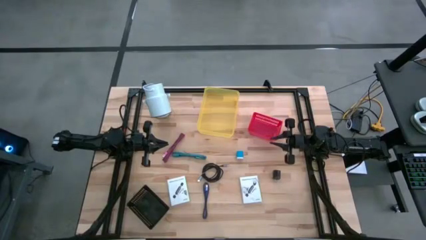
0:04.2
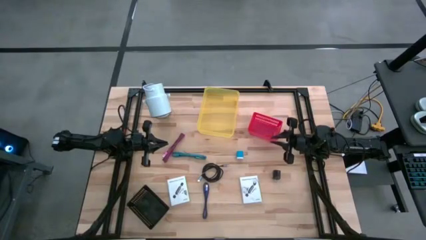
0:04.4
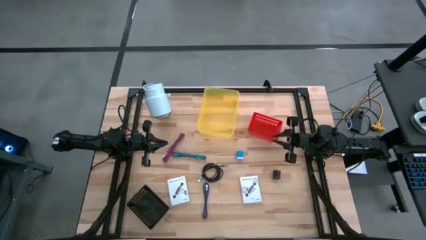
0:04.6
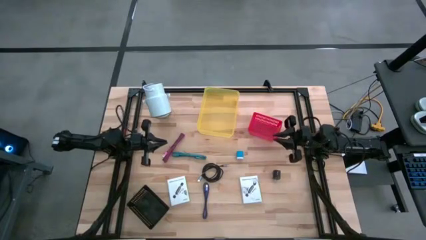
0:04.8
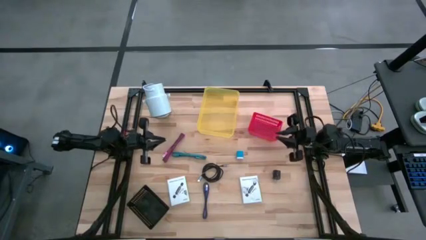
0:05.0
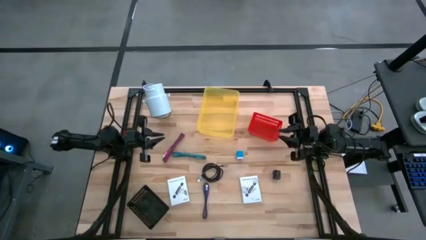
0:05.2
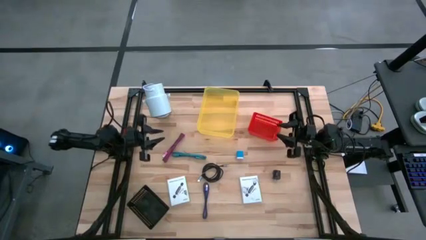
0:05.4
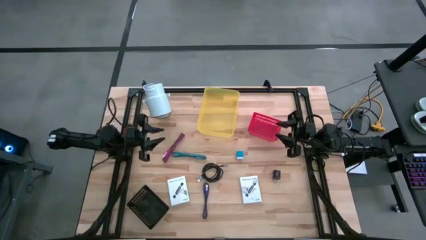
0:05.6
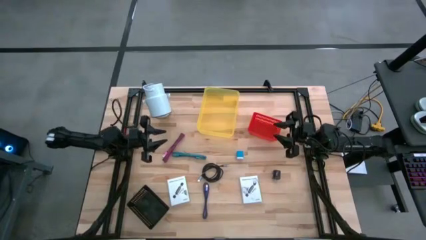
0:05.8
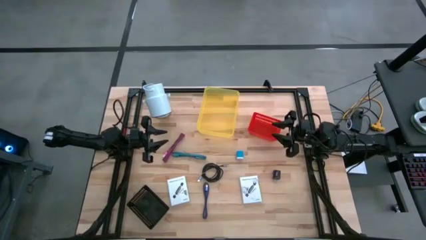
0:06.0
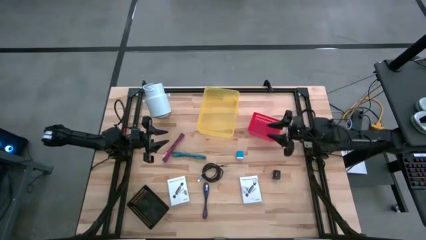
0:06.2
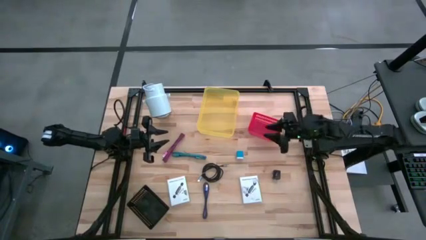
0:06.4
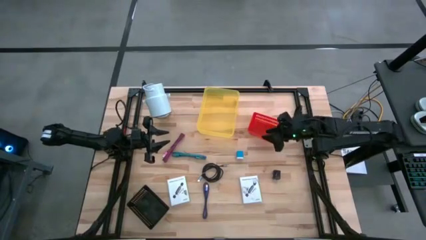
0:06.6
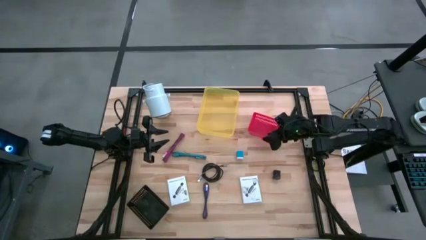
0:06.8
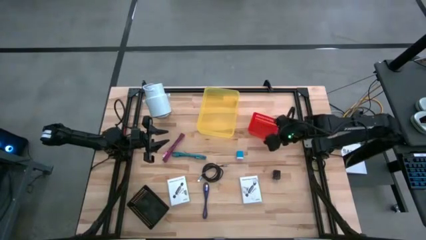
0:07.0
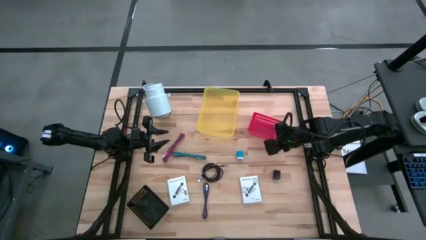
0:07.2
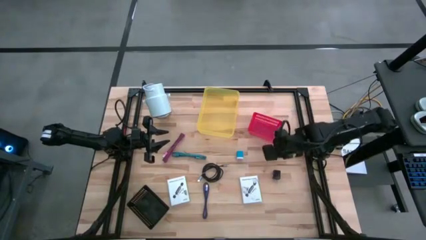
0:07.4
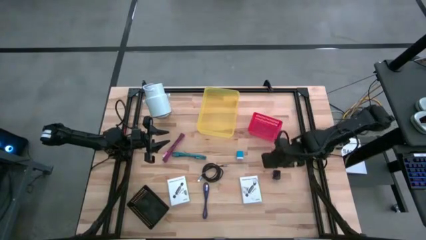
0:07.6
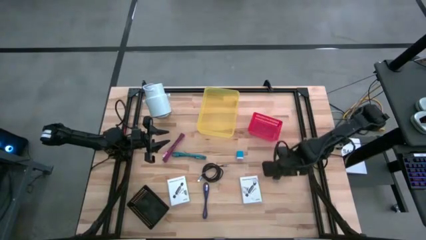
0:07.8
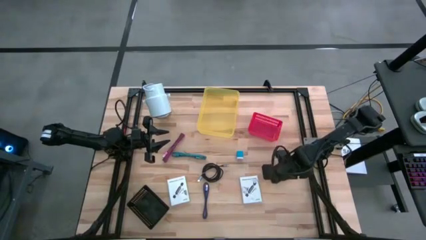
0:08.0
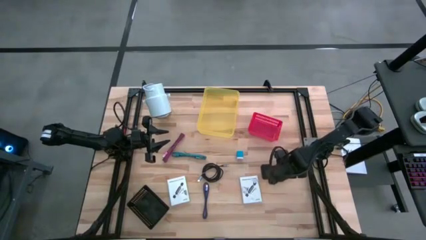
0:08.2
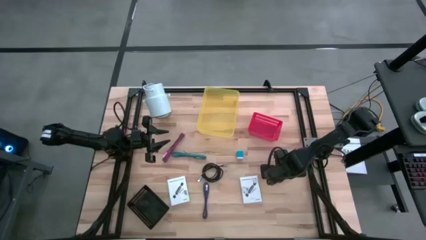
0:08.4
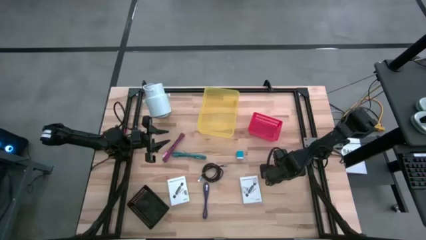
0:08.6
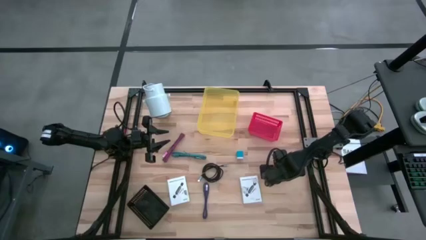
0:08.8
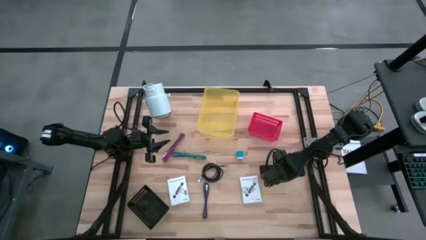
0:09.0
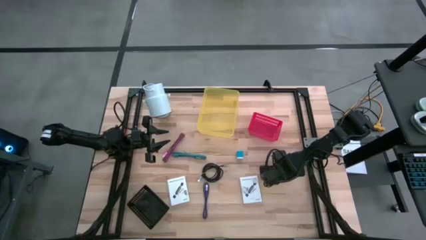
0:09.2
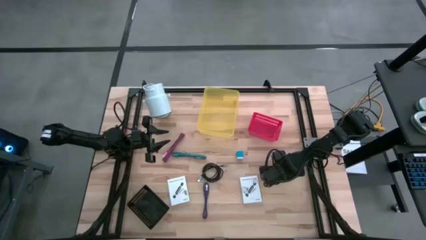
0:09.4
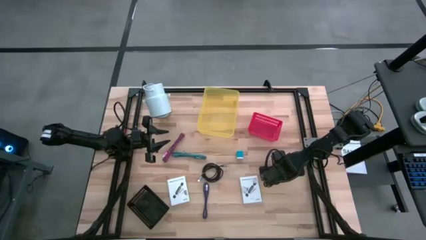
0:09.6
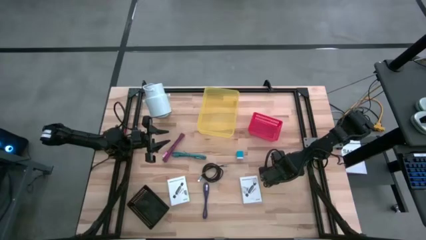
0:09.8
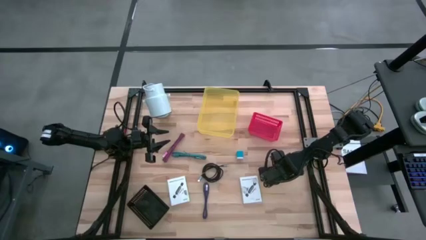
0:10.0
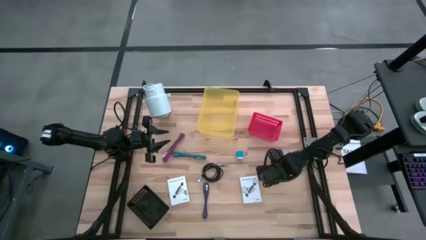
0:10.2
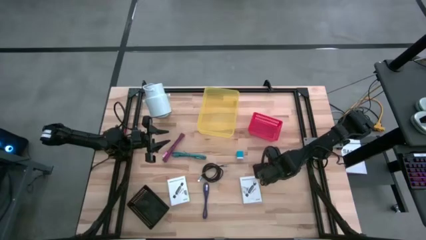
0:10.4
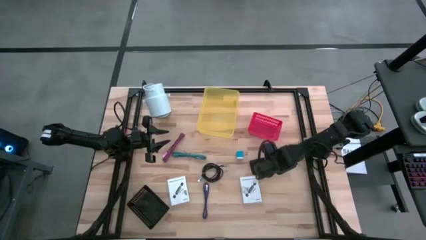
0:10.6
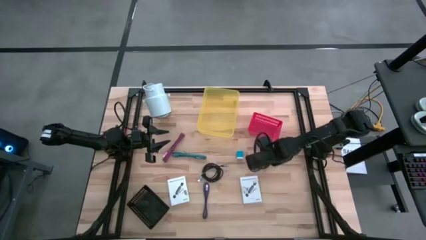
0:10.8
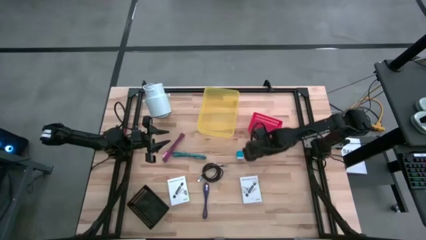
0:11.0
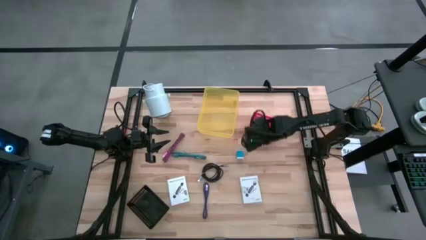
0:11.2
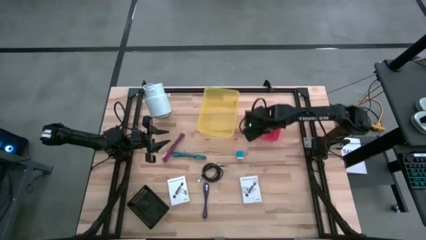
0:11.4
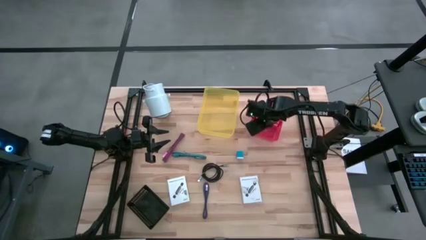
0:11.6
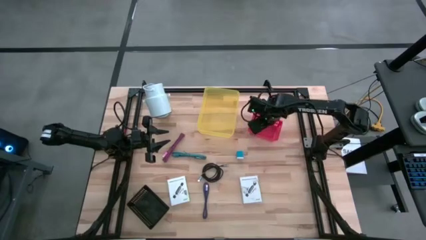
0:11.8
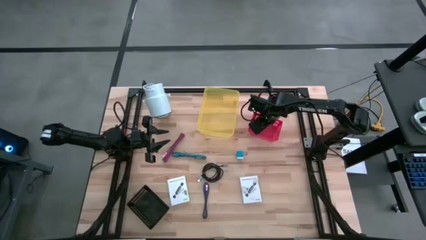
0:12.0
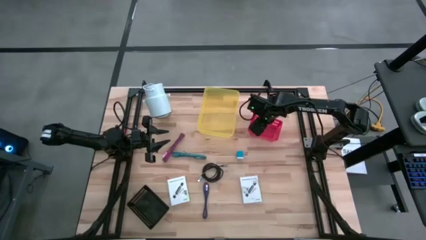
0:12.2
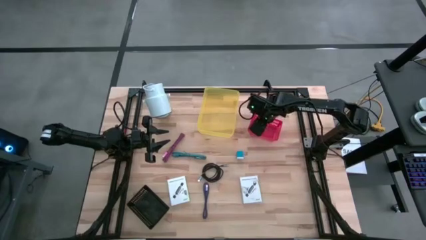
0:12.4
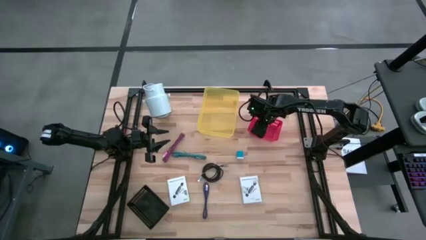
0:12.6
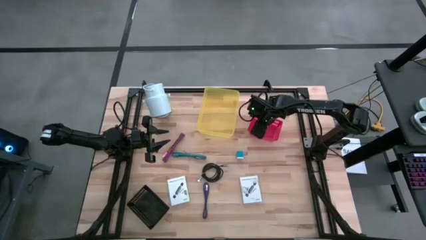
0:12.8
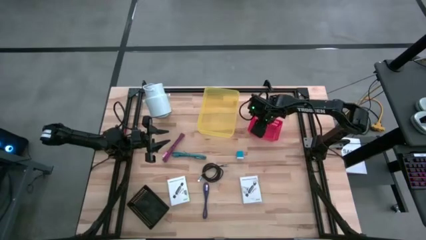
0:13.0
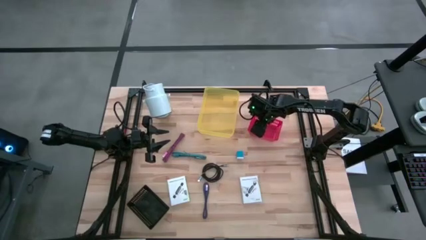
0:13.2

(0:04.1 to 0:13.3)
Task: Pick and place items into bin
Put the black charger adapter into the red bin

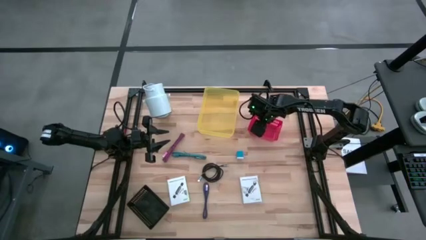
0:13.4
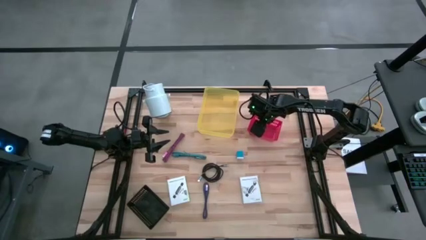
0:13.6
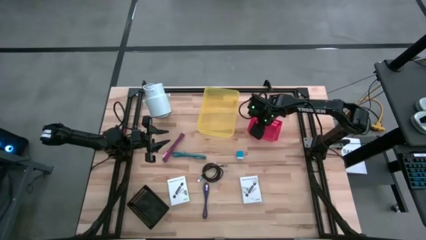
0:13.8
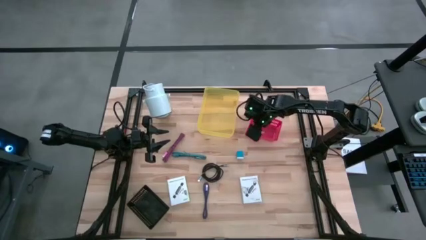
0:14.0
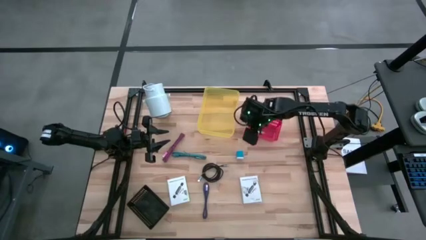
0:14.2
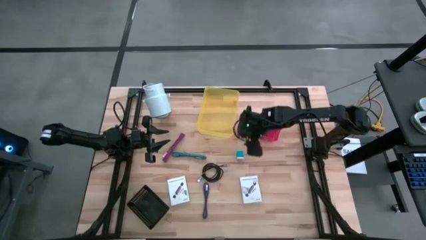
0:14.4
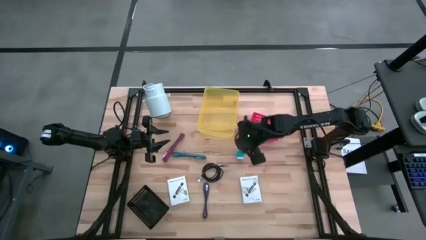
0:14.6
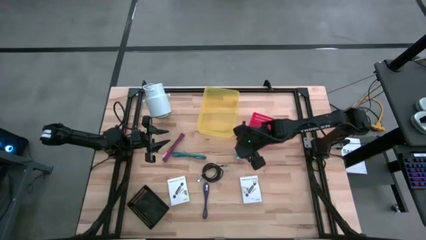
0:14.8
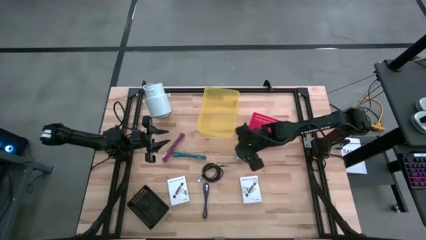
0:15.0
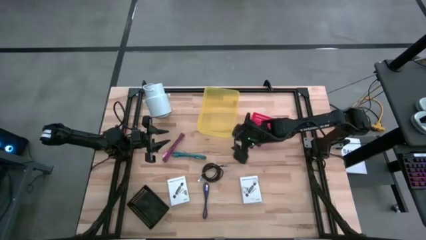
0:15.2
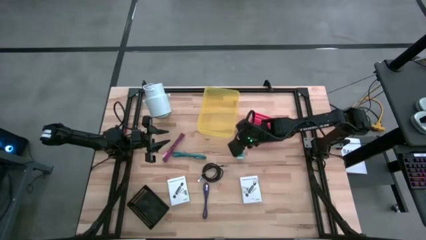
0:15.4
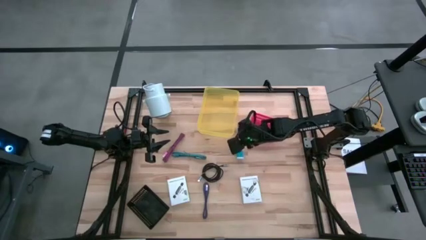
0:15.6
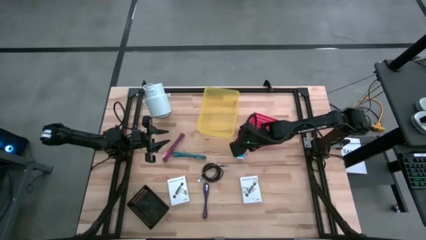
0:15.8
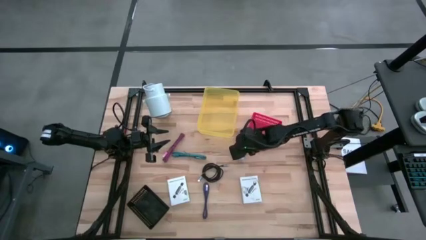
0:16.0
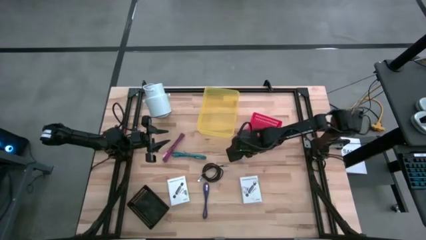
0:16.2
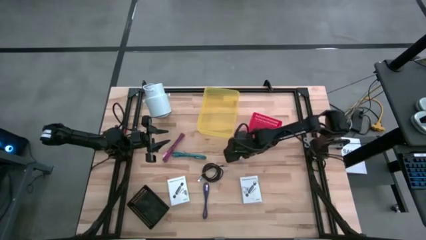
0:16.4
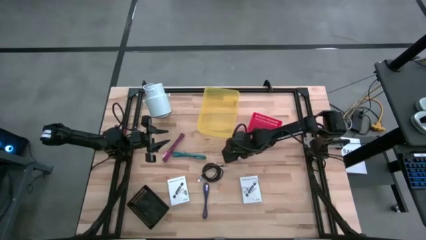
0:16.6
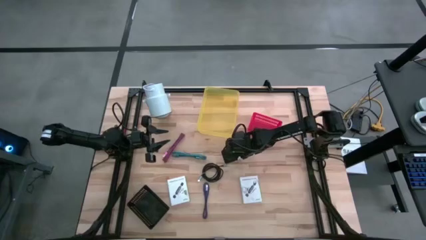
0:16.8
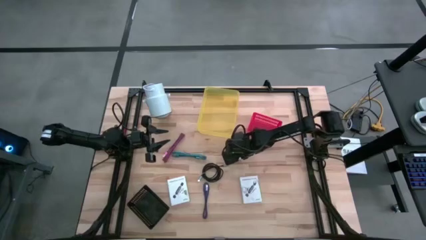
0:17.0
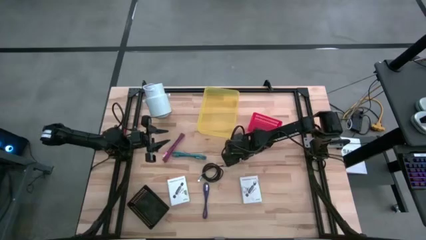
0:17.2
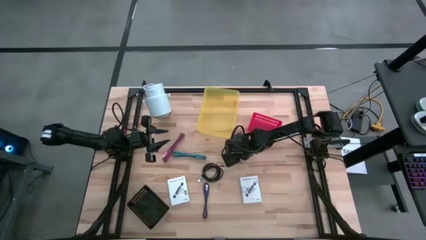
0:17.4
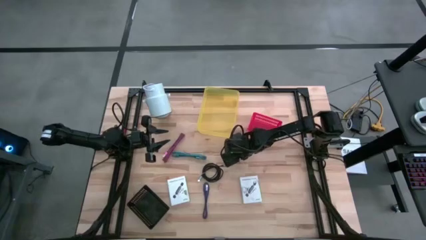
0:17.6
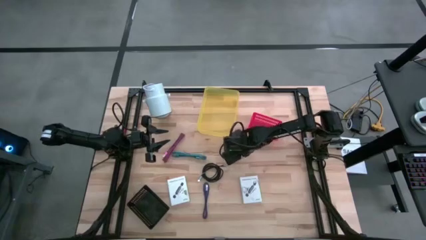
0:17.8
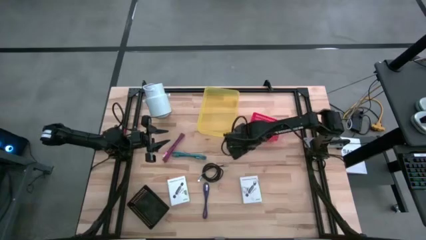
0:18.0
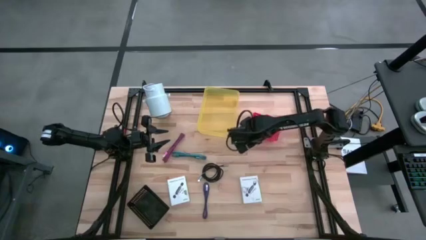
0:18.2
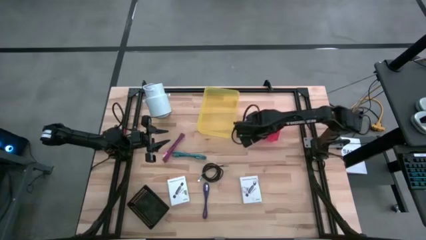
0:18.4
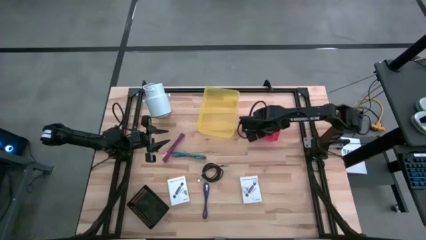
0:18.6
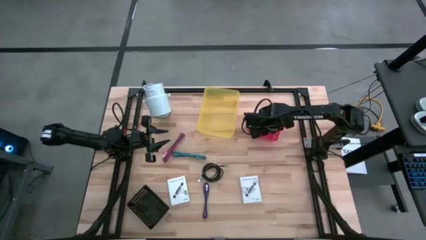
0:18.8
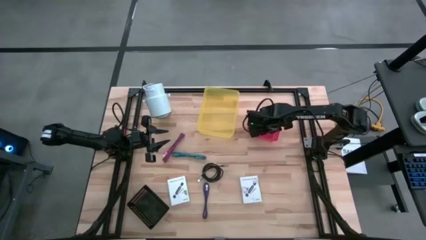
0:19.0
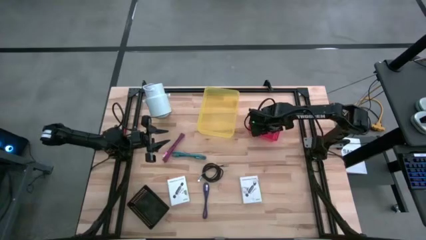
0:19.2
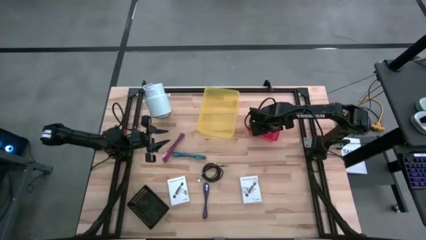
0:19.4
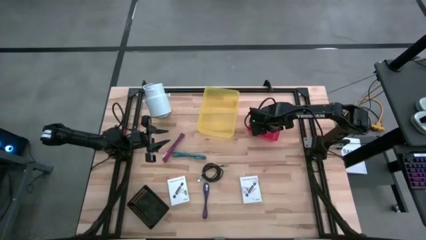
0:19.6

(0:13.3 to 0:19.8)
Put the blue charger adapter into the red bin

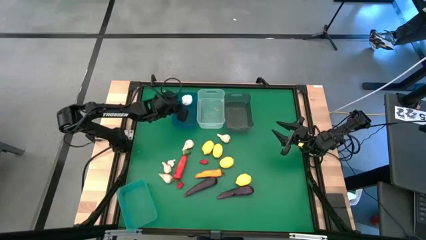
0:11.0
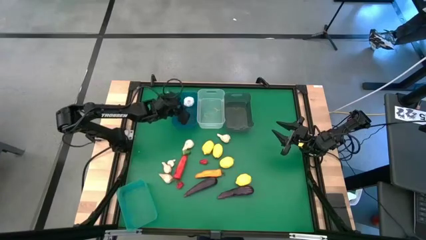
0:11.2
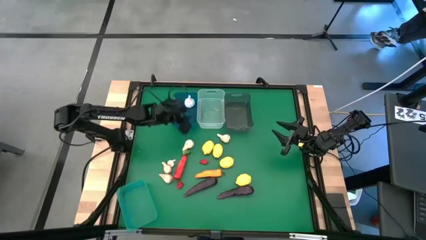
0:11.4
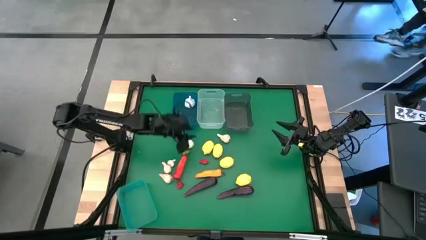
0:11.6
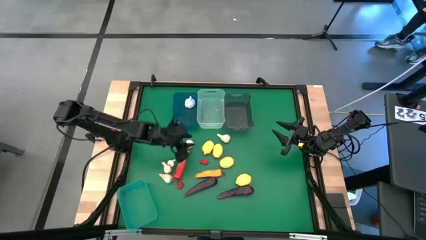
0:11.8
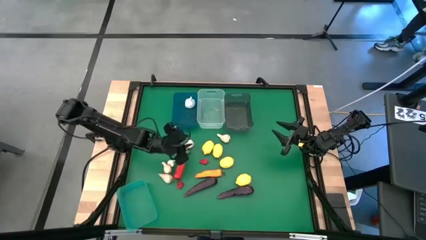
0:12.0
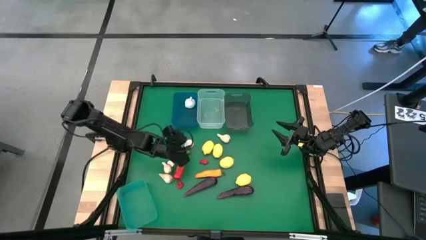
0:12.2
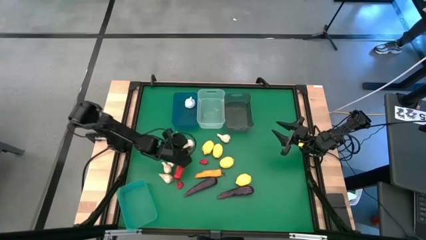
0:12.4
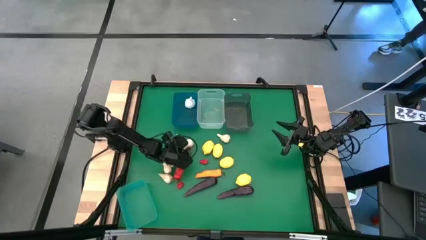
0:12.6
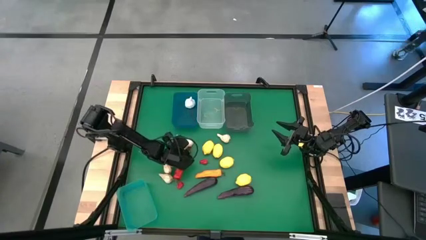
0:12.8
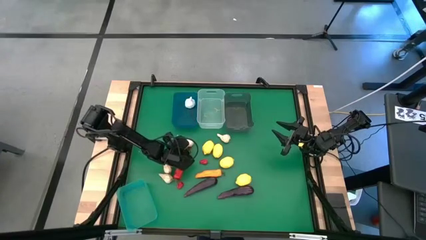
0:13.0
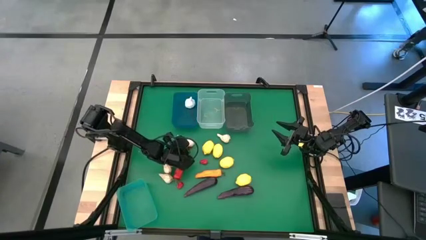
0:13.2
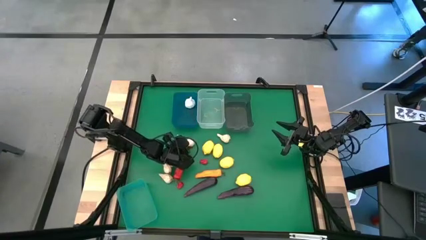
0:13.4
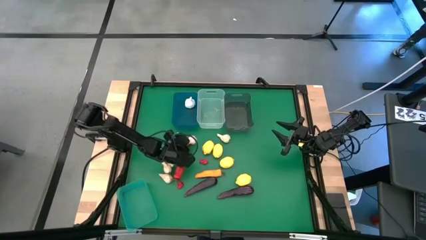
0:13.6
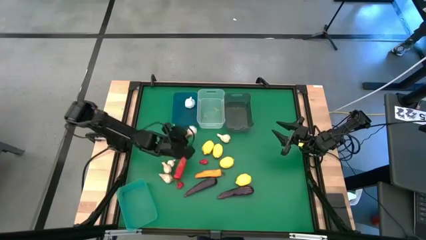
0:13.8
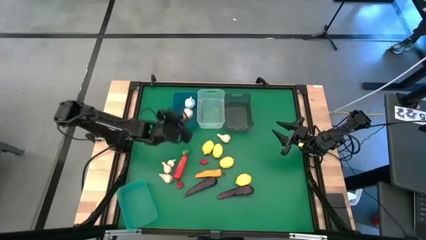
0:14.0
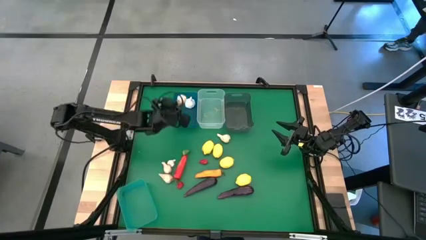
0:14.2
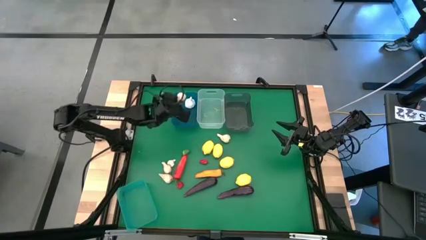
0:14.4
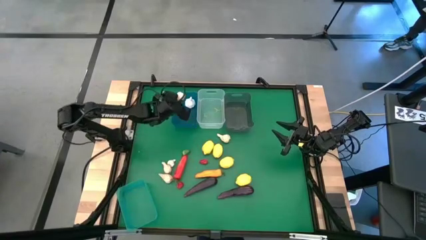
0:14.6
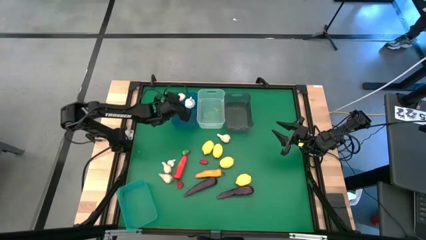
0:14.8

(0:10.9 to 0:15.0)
Task: Sort produce into baskets
Put the white garlic into the blue bin
